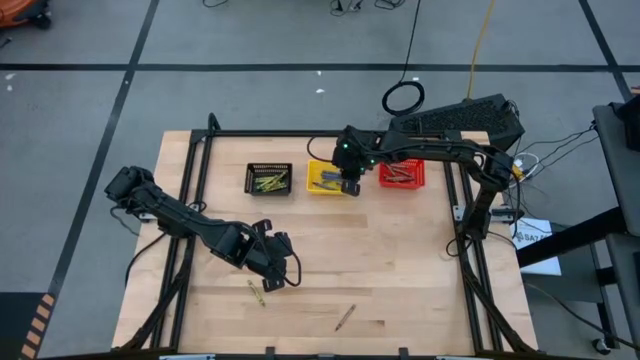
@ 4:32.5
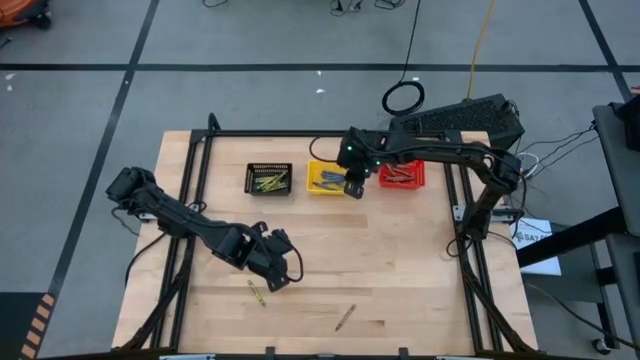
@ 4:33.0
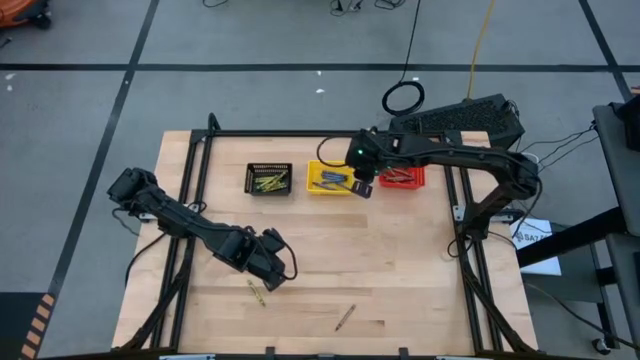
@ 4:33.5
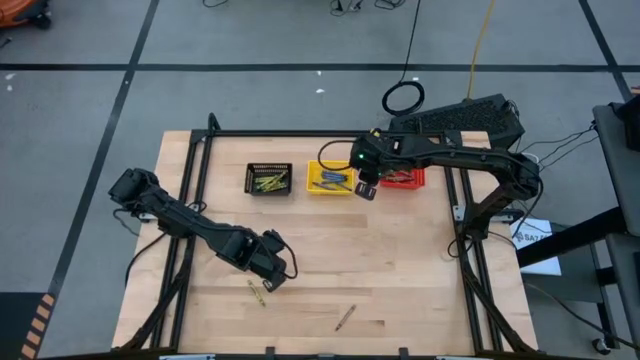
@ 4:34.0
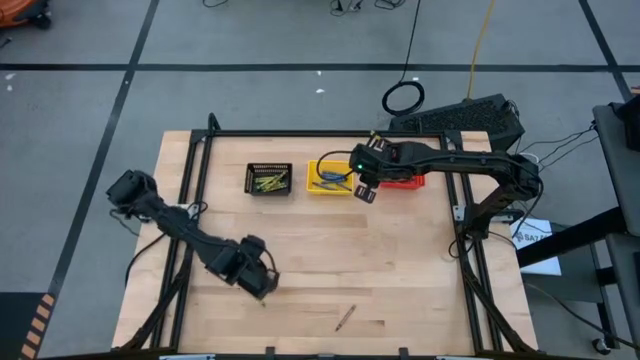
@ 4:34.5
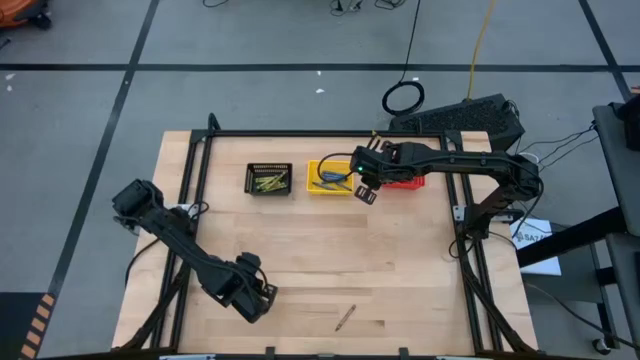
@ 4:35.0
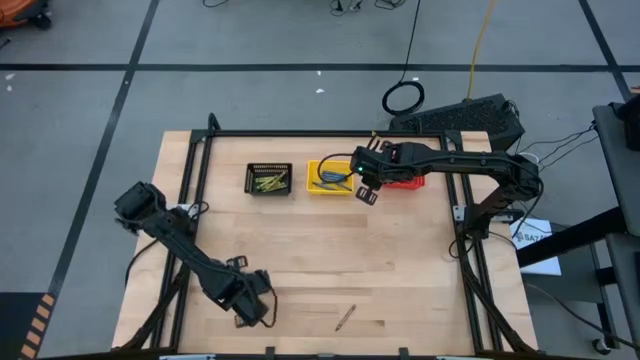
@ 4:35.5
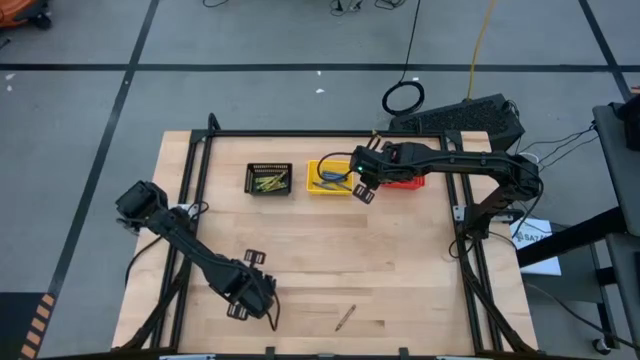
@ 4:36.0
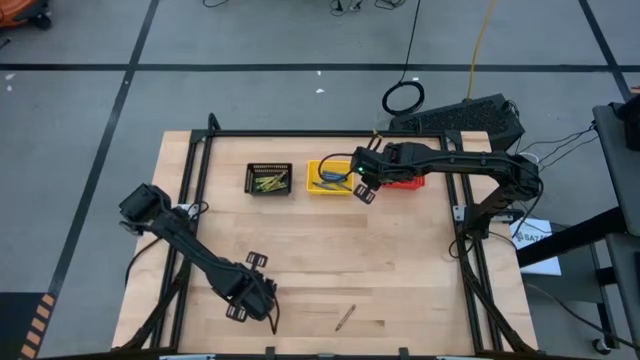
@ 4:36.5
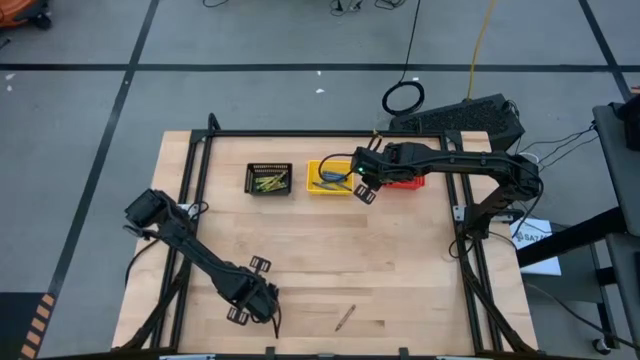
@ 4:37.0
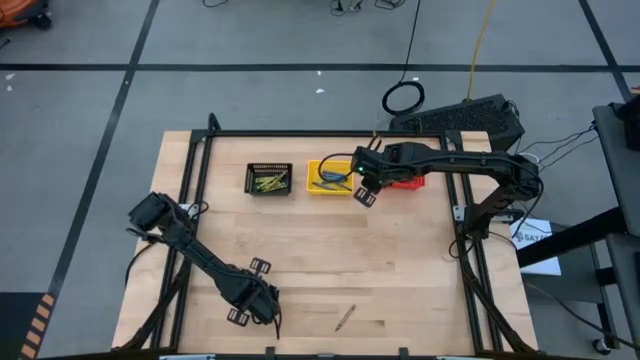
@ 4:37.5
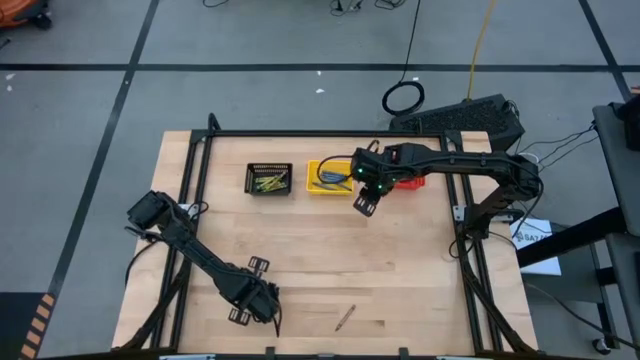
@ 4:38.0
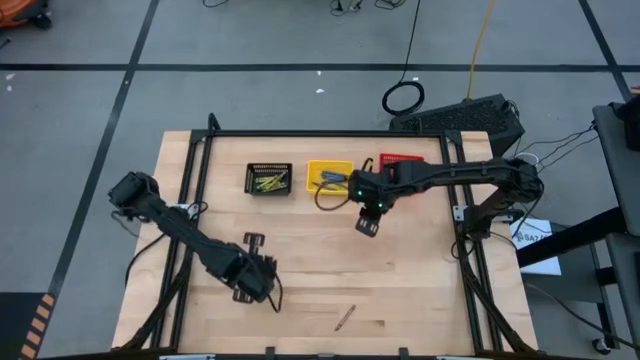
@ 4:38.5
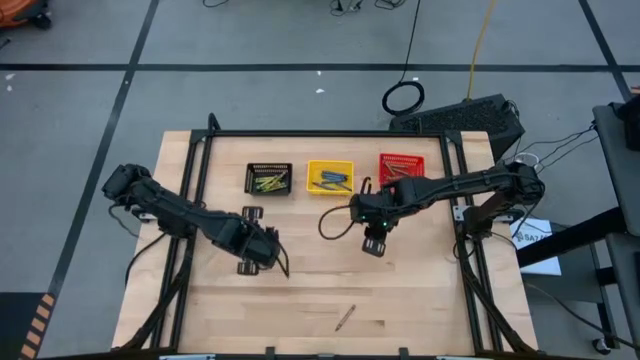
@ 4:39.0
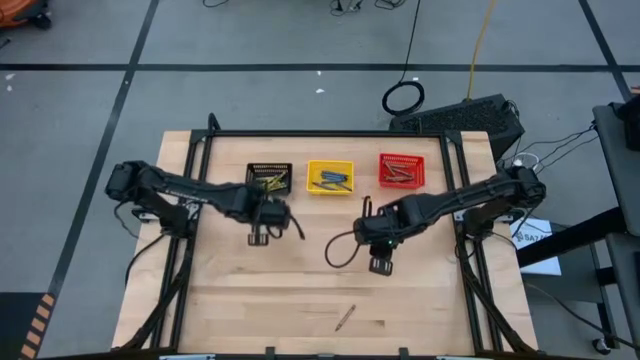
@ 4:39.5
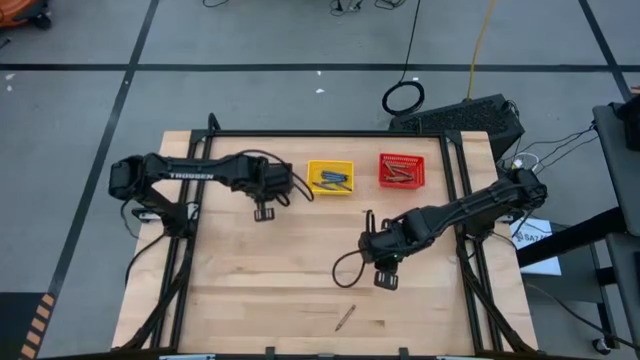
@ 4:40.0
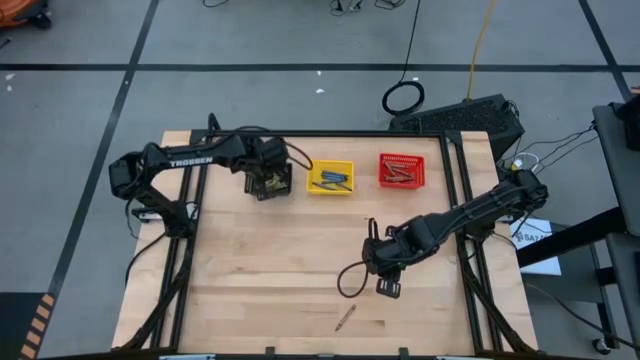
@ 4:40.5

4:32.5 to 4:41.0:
Task: Sort crayons
Put the green crayon into the black bin

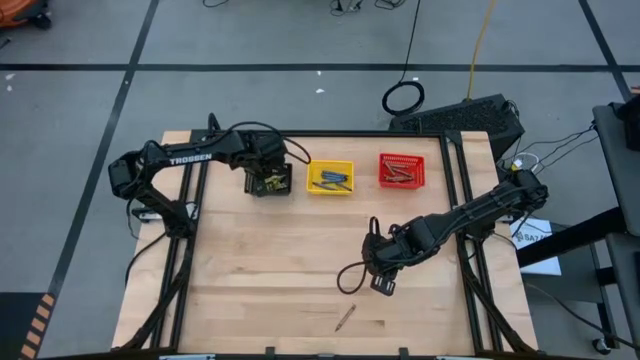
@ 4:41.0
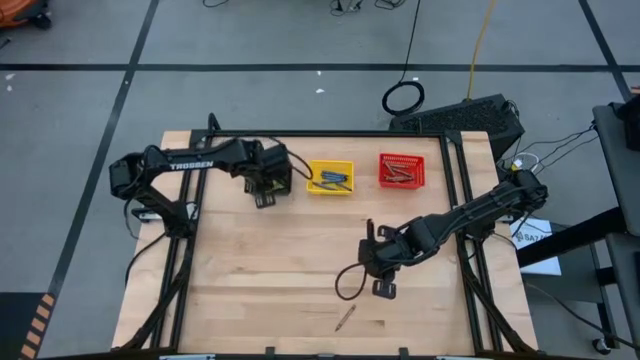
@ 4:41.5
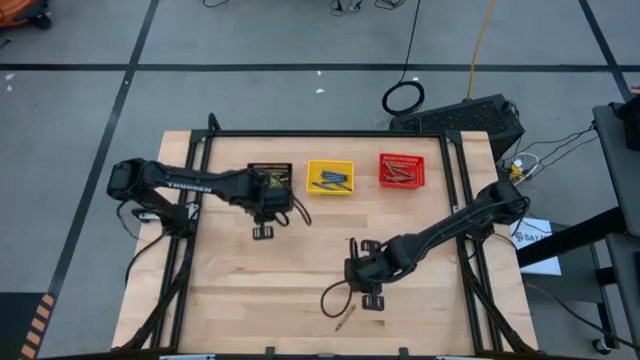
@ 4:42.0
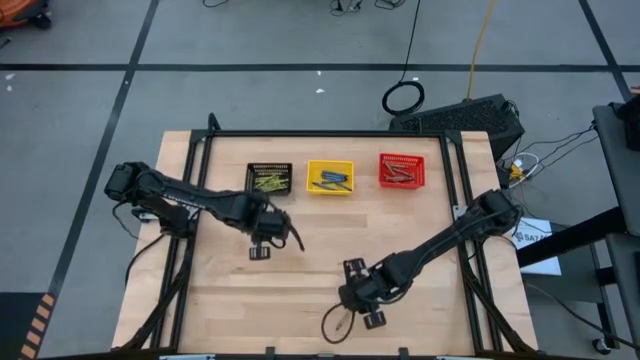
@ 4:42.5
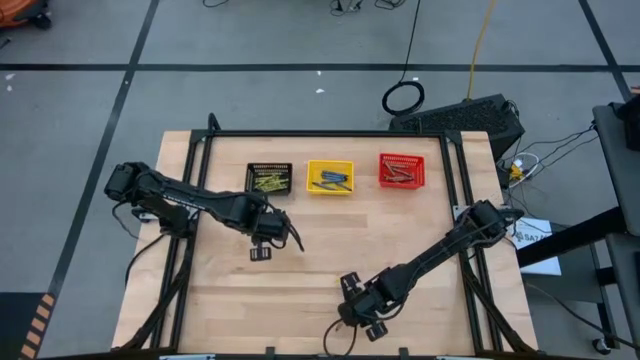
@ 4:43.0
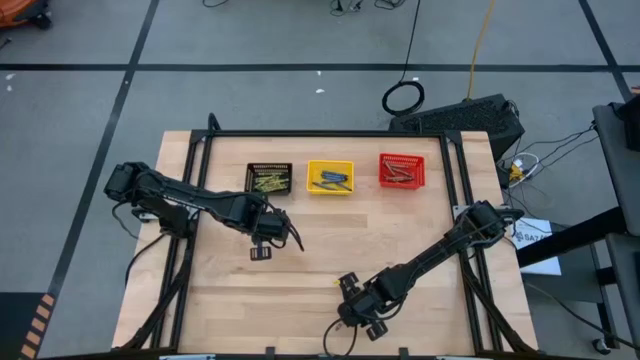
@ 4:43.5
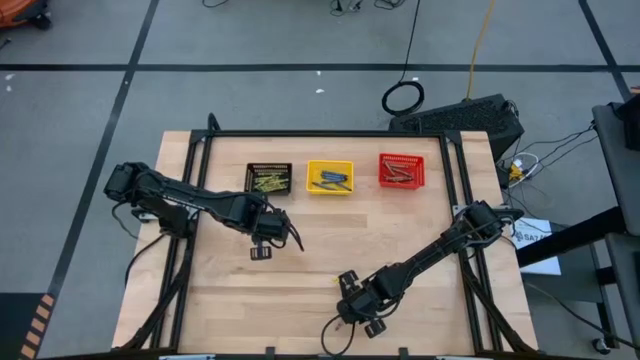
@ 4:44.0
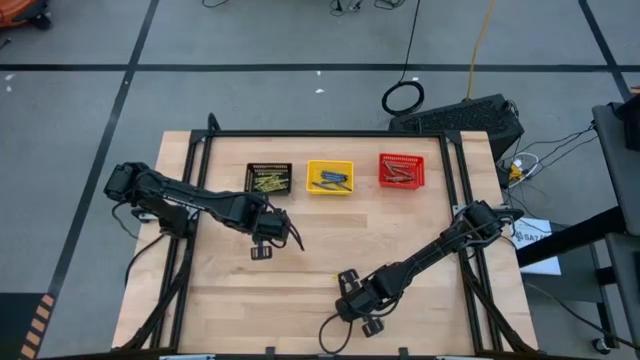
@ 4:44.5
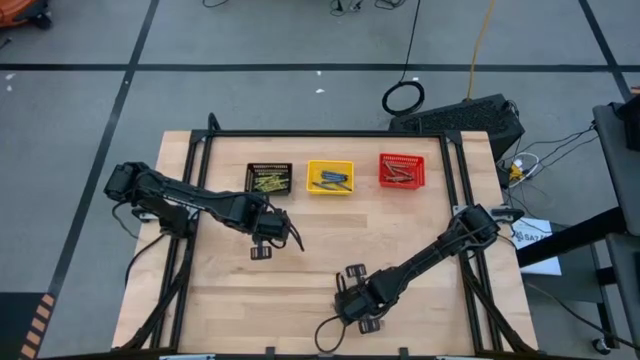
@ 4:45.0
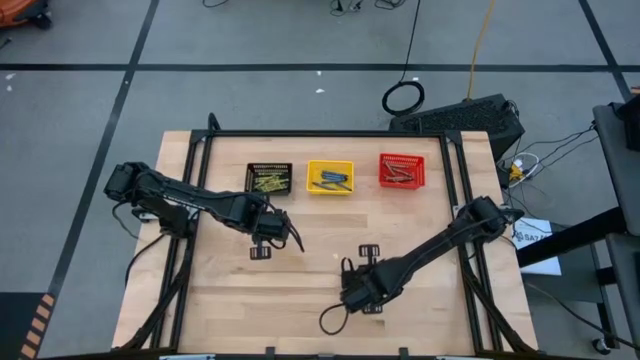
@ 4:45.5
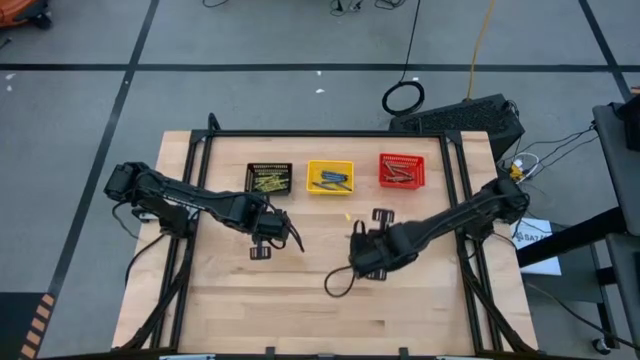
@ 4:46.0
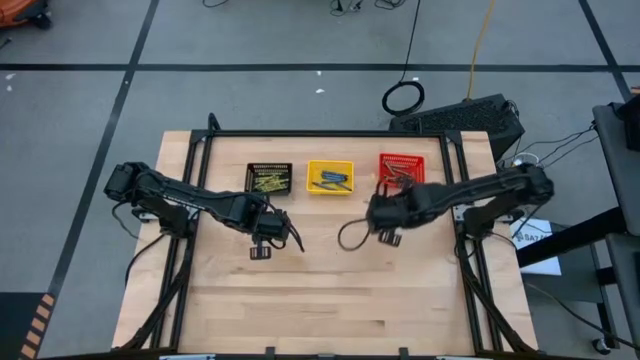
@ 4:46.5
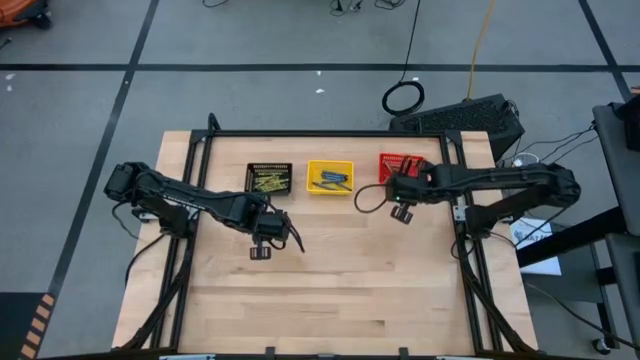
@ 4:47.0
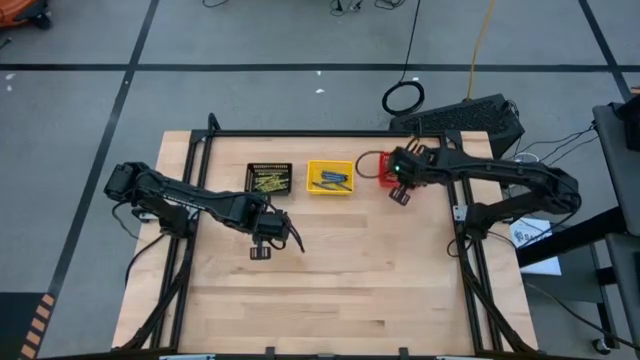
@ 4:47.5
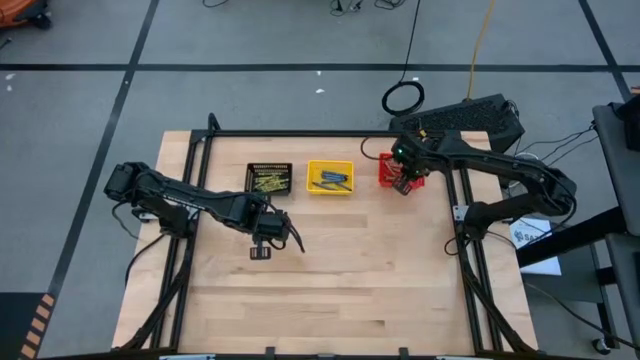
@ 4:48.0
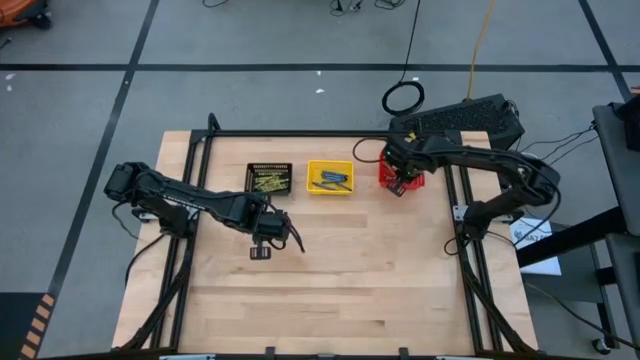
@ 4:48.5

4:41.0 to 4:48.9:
Put the brown crayon into the red bin

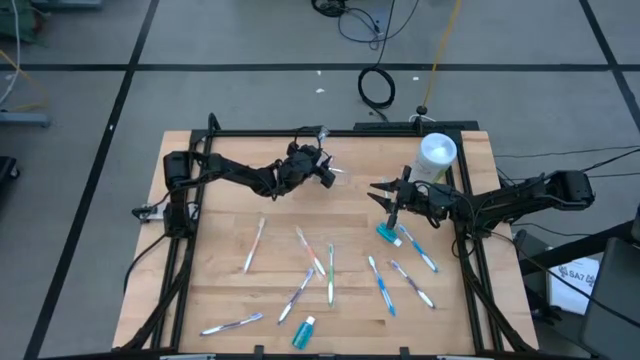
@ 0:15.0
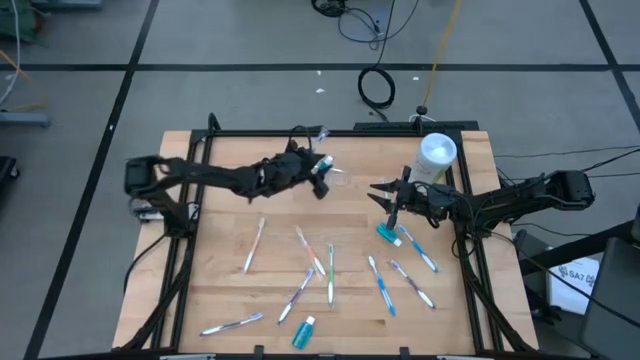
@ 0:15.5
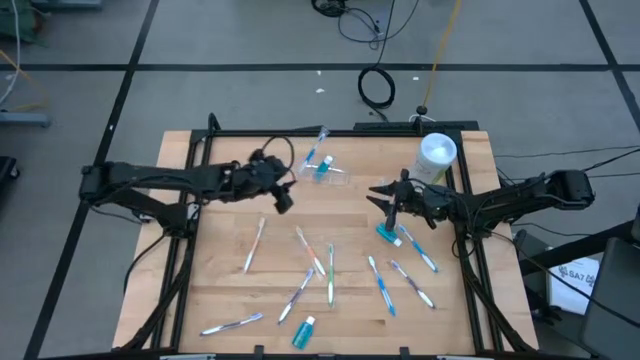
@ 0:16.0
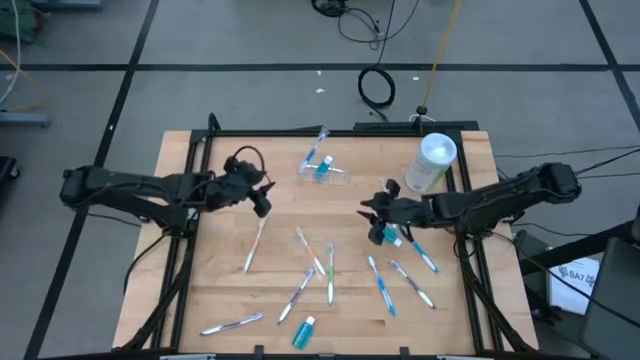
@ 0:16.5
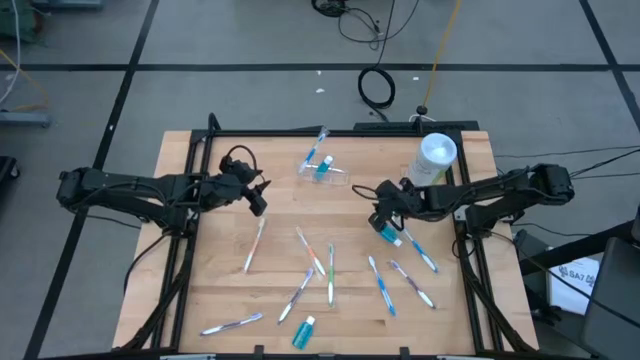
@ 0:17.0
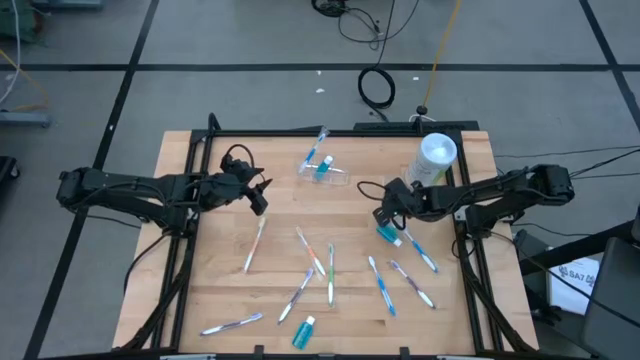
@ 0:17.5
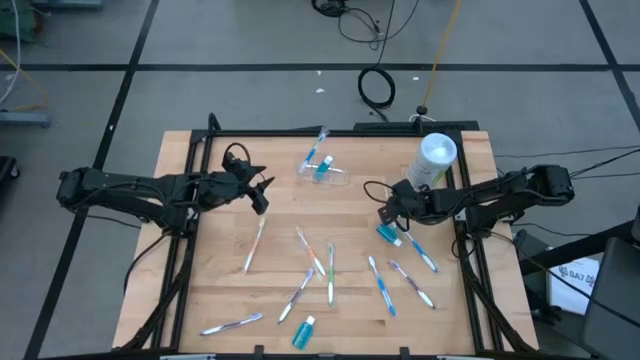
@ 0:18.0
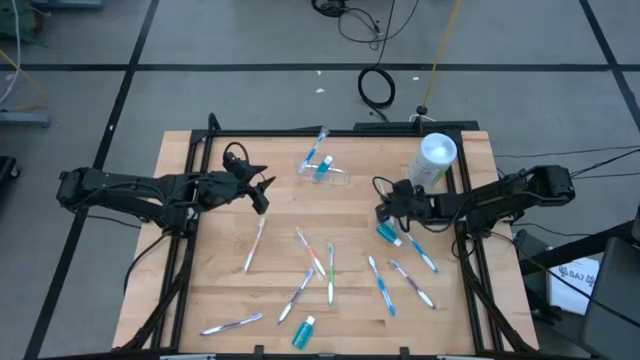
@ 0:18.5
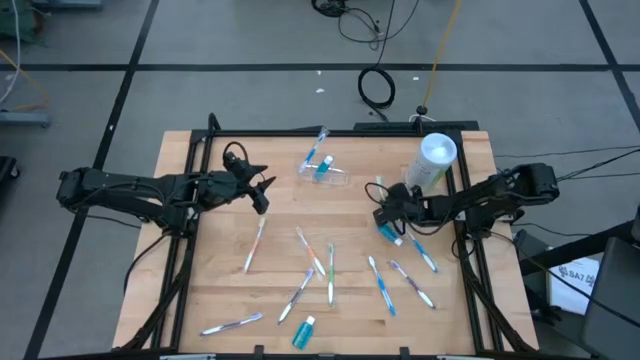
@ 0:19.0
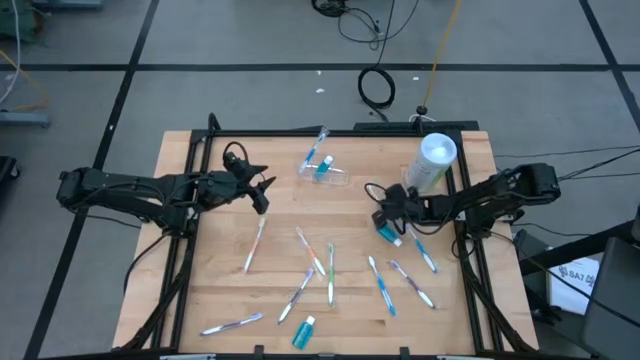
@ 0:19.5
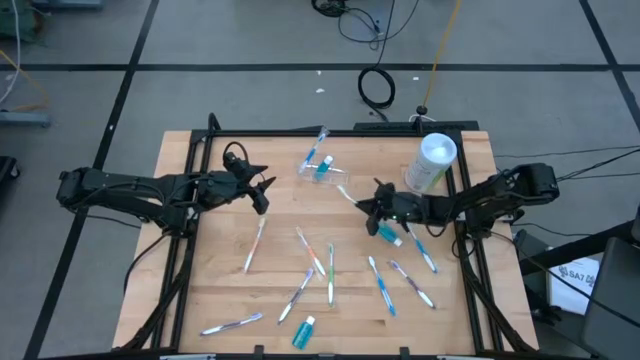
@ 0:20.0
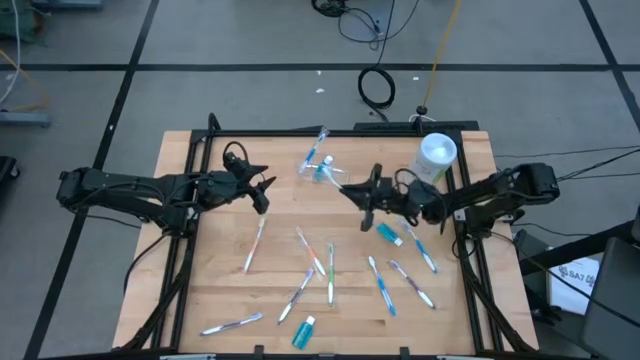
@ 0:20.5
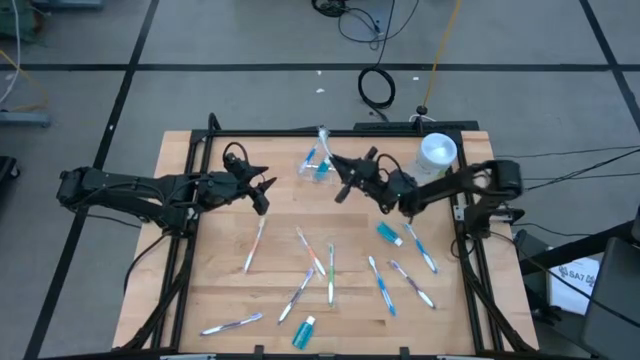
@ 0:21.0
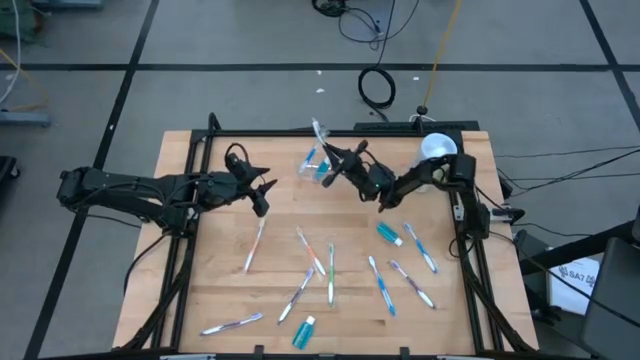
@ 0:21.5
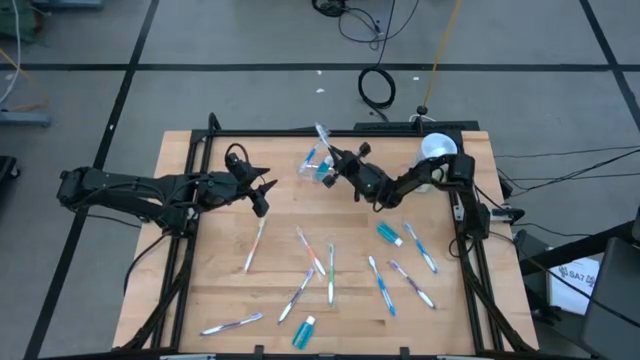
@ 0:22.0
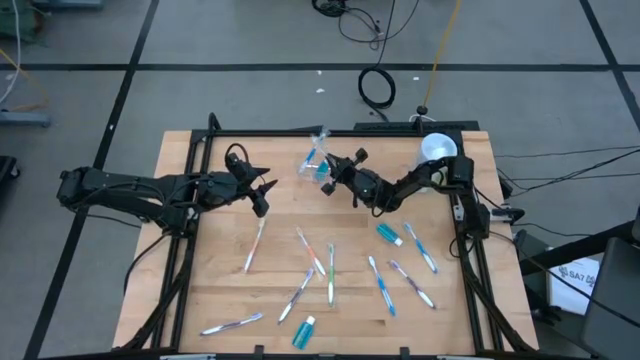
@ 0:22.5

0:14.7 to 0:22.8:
Task: Pick & Place toothbrushing station
Put the top green toothbrush into the transparent organizer
